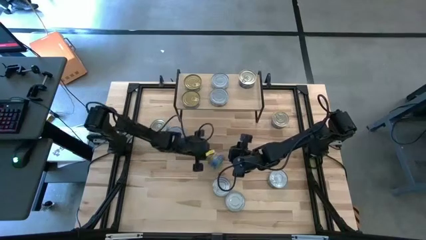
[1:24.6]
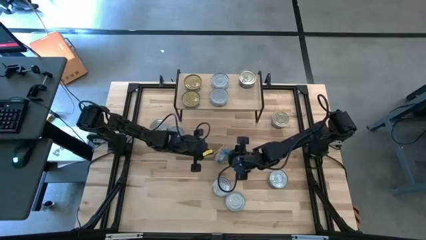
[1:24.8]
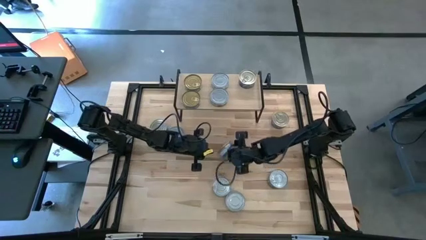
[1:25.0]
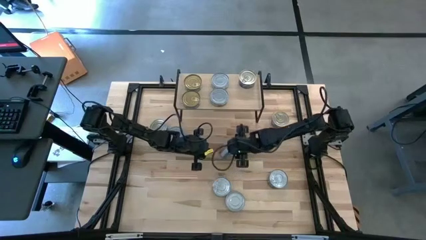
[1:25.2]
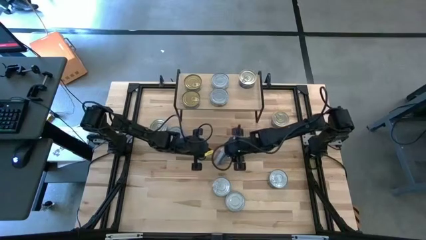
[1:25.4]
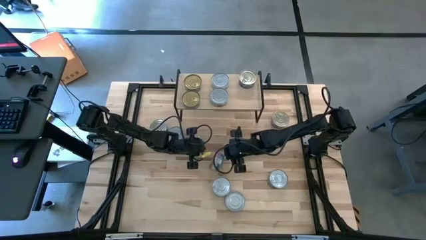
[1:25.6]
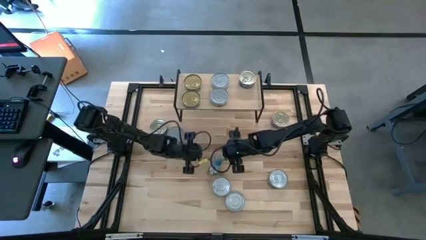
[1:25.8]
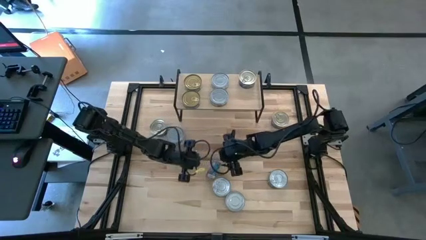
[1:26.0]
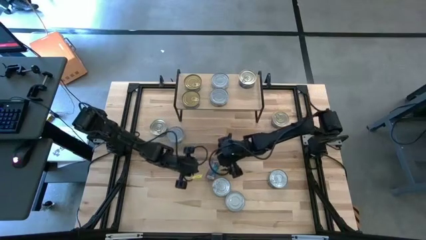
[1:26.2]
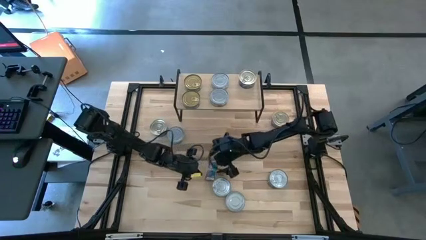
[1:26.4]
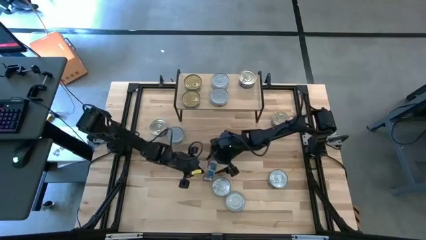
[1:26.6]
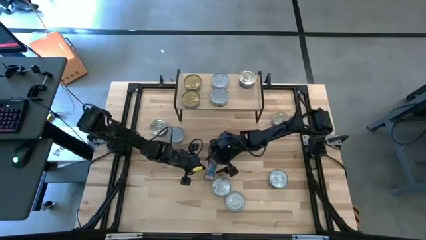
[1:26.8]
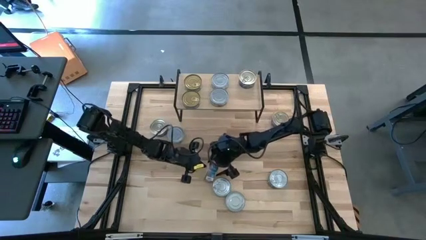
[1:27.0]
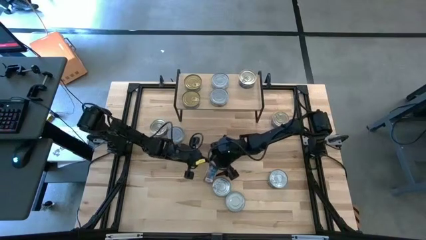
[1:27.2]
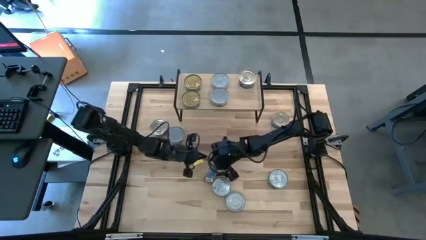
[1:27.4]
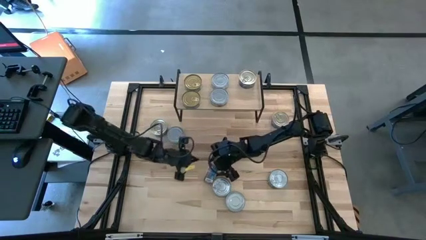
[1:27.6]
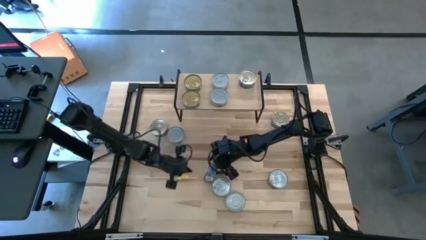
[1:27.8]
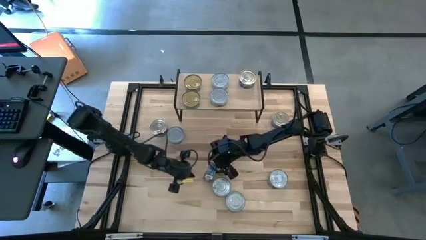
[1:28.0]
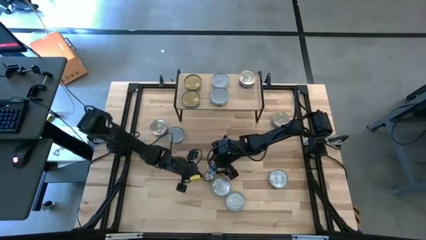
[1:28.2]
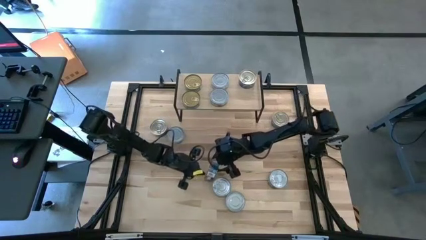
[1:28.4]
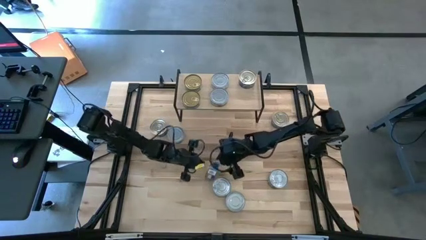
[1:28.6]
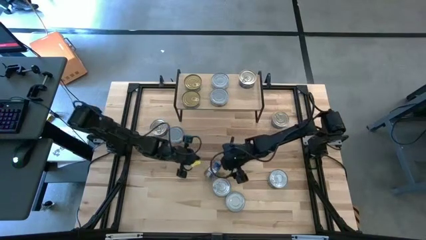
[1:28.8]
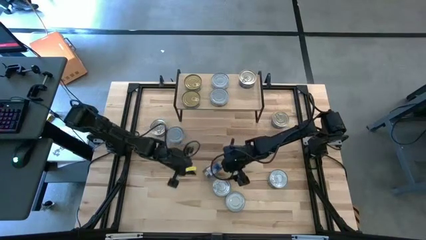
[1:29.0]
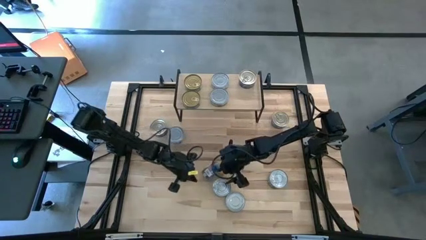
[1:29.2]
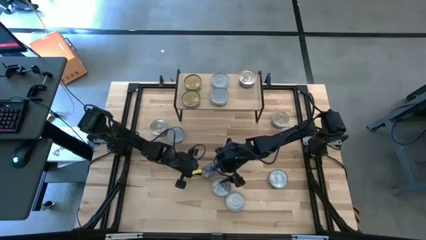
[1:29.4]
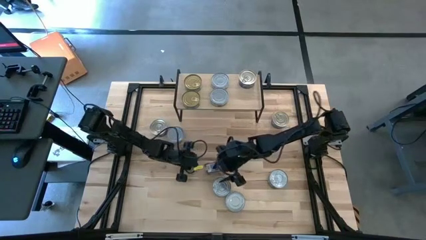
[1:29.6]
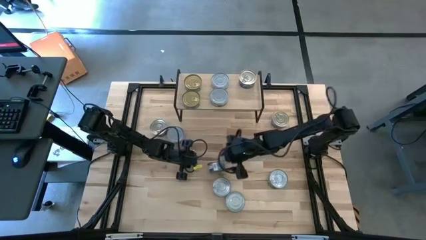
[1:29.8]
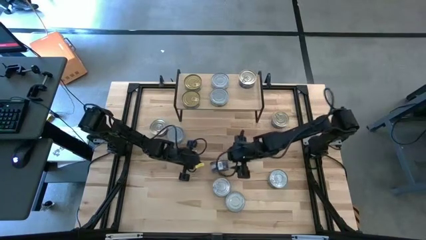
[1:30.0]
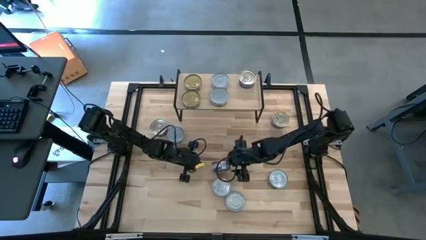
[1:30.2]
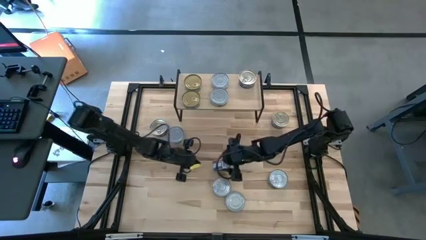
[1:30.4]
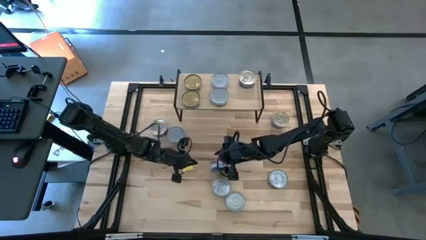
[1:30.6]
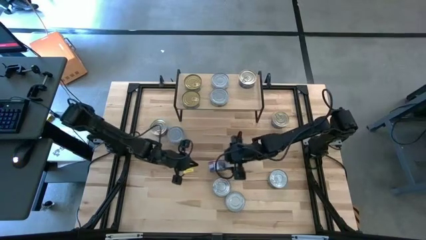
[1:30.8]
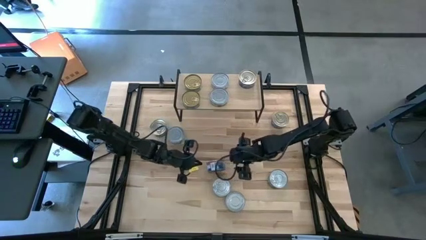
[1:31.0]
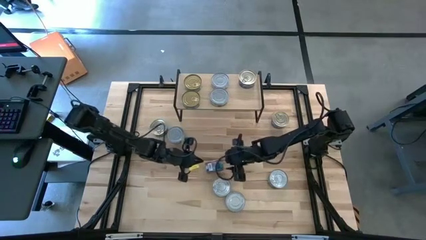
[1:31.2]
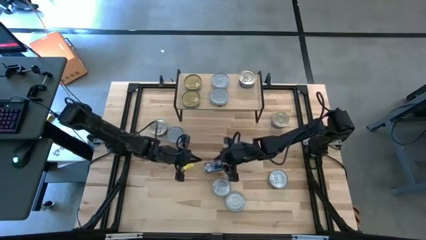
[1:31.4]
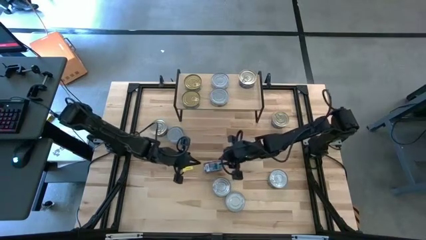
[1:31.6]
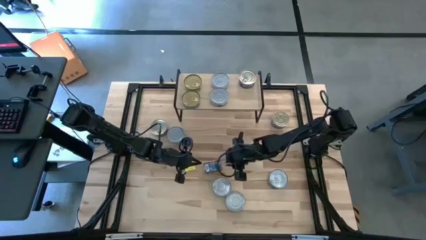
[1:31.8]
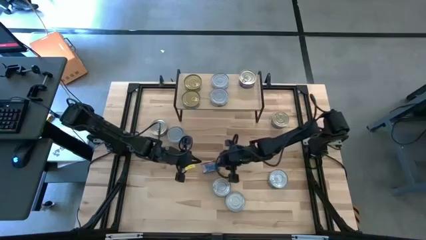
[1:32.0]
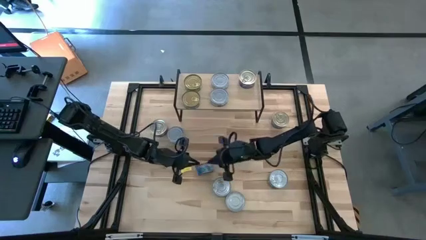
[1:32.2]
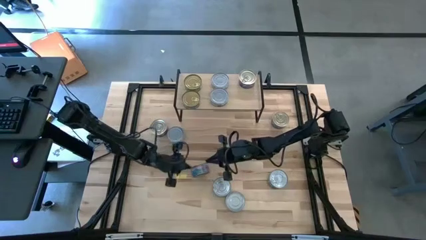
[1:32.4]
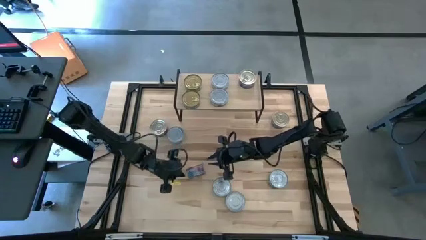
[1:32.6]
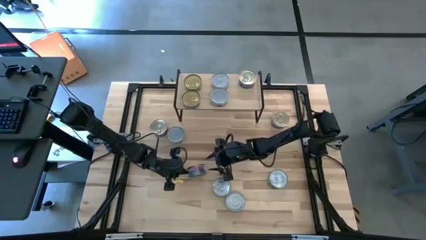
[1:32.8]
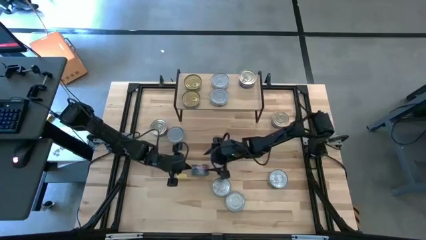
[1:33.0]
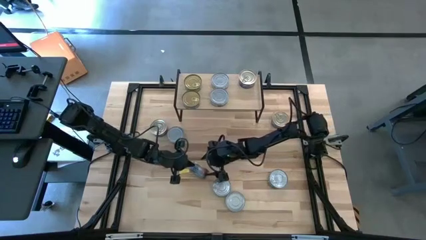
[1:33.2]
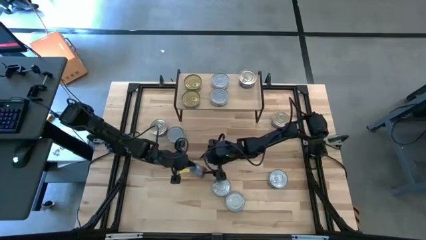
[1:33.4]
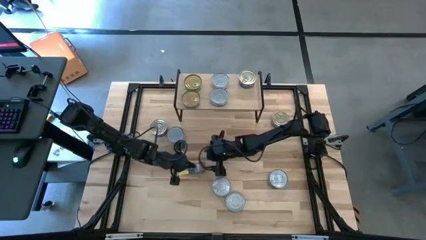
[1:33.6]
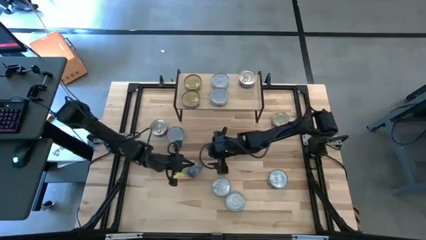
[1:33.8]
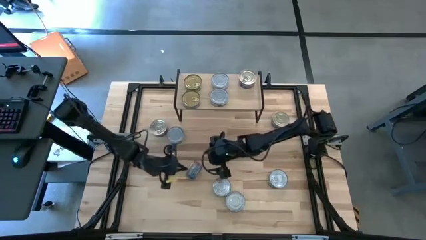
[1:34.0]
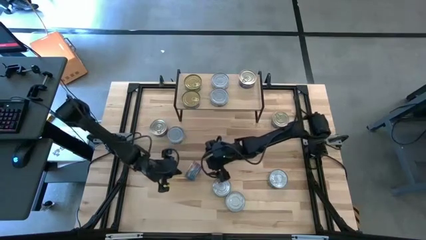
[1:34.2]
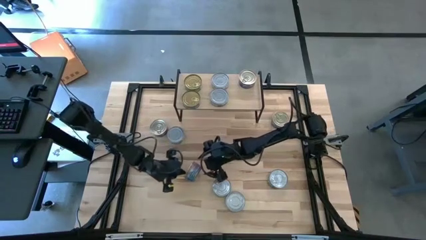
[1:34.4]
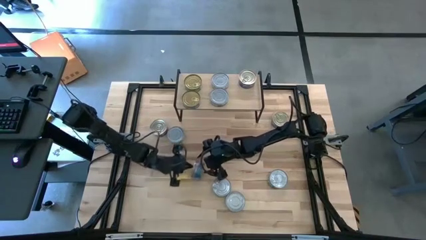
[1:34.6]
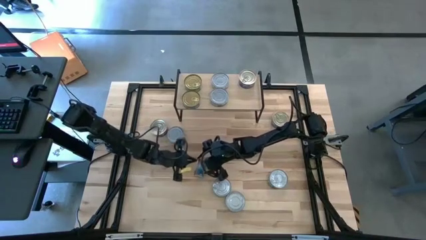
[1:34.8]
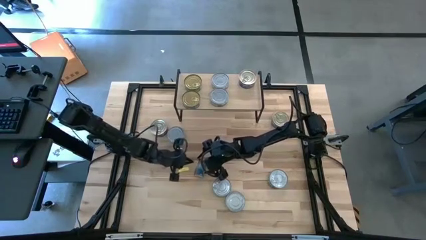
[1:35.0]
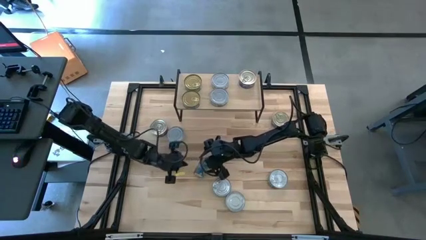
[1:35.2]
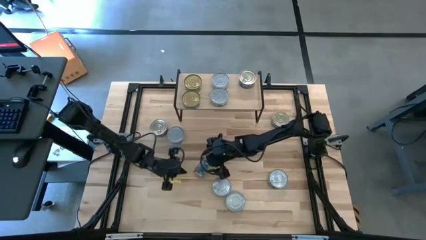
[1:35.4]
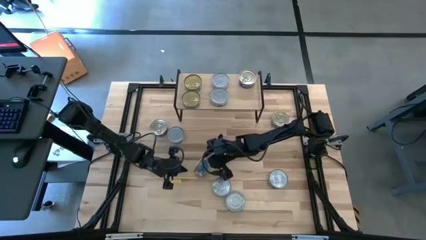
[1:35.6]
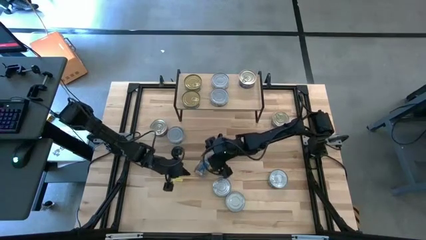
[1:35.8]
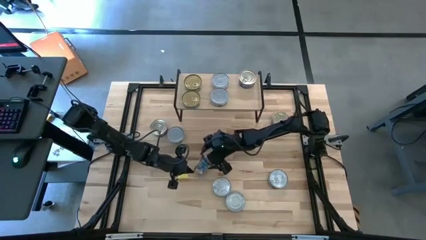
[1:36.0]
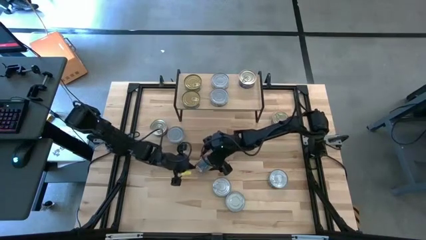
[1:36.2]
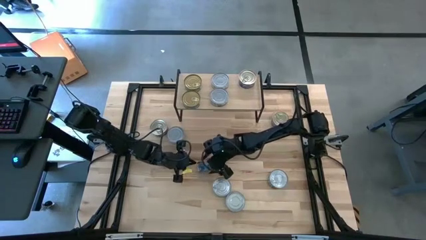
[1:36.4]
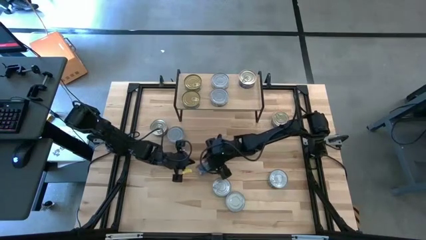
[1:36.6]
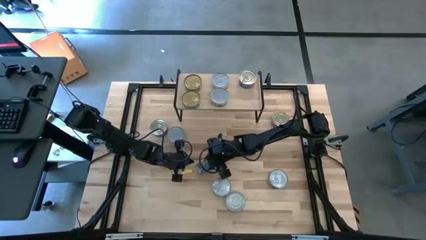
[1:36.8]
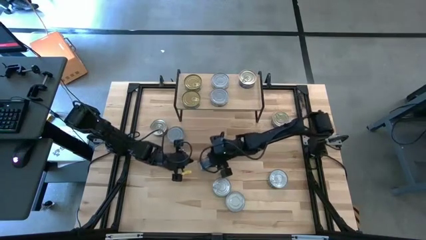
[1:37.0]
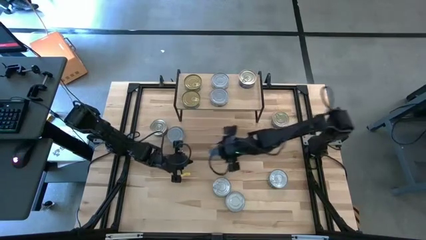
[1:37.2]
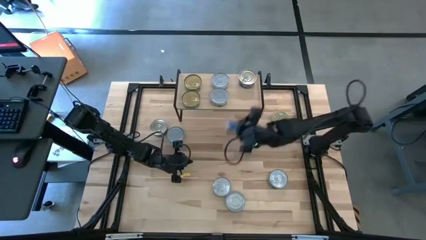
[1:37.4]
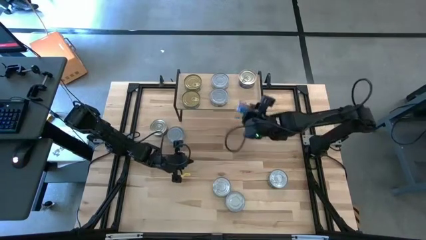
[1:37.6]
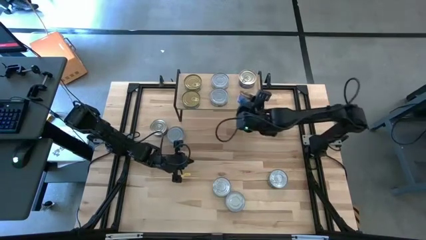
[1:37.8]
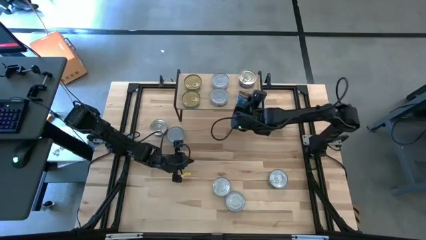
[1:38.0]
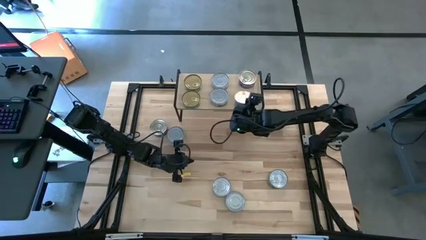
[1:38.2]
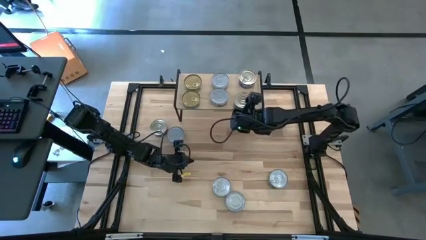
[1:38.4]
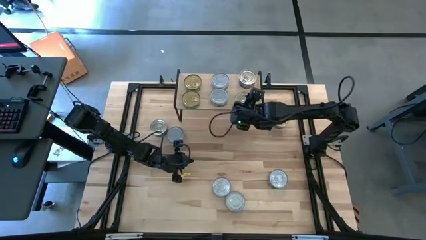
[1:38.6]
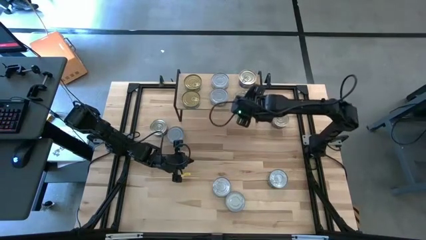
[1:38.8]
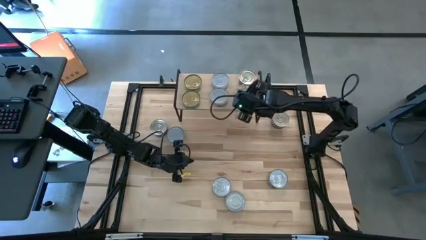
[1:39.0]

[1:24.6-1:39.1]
Task: Stack canned seafood by type on shelf
Put the bottom blue tuna can on the shelf aligned with the other blue tuna can

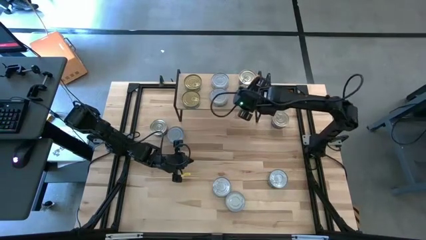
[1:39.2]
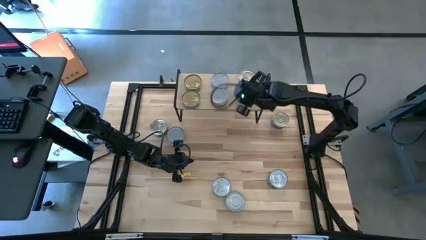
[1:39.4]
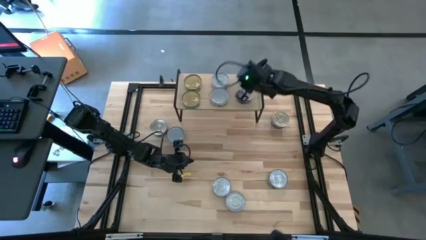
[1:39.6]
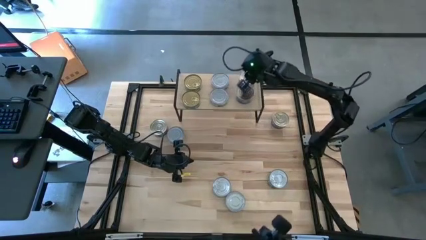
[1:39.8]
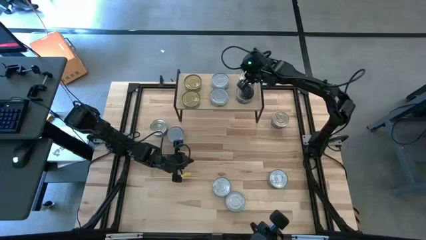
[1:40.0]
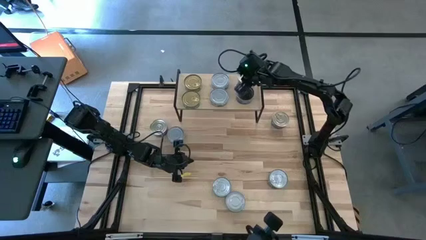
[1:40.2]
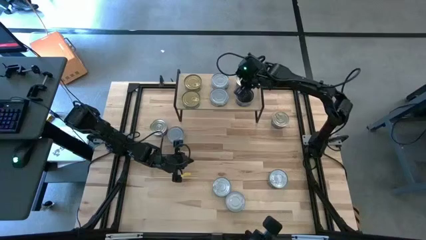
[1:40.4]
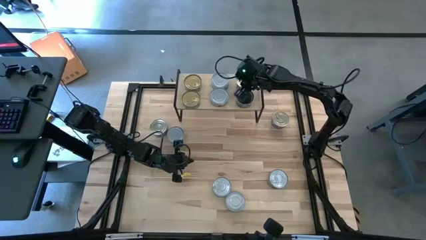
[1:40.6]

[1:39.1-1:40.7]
Adjust the top blue can on the shelf
